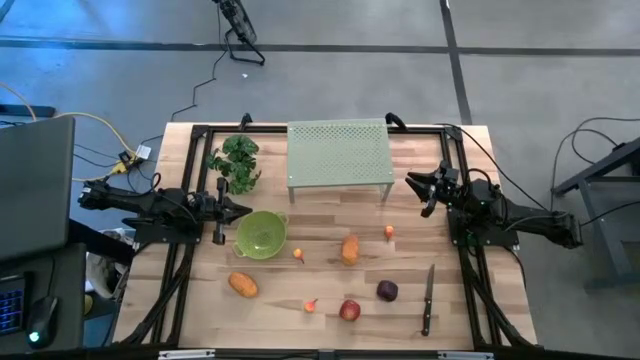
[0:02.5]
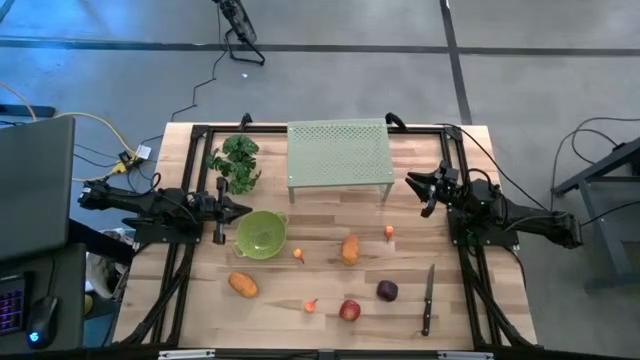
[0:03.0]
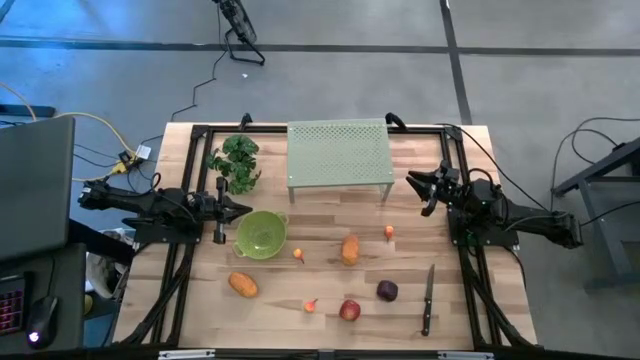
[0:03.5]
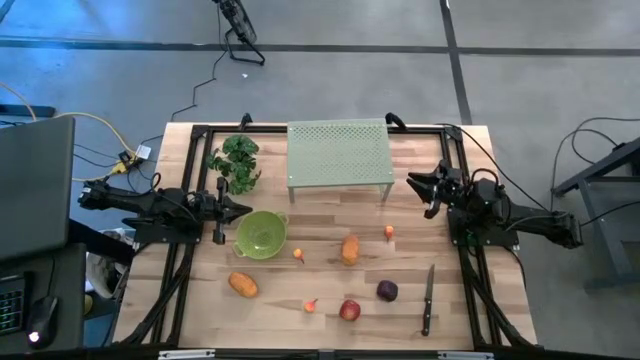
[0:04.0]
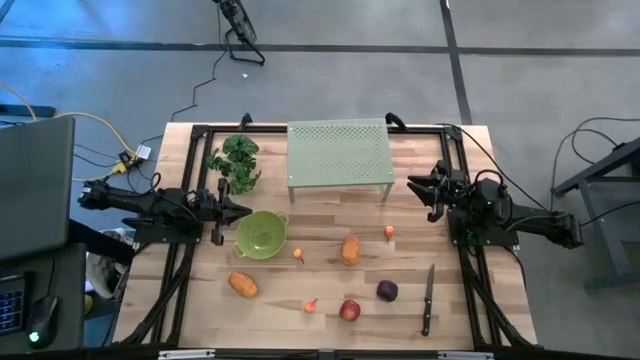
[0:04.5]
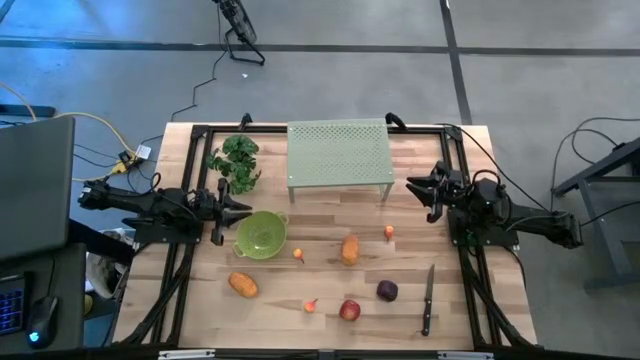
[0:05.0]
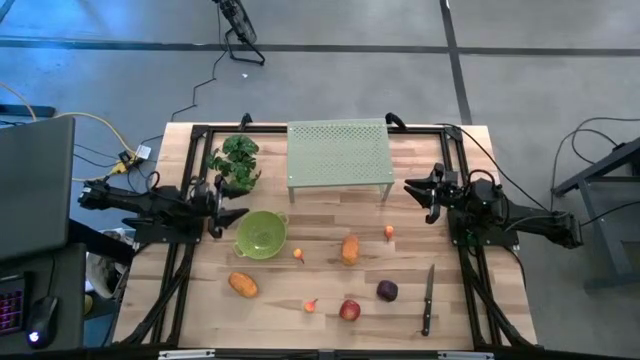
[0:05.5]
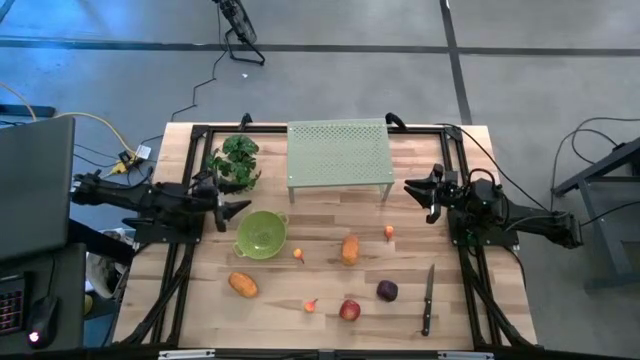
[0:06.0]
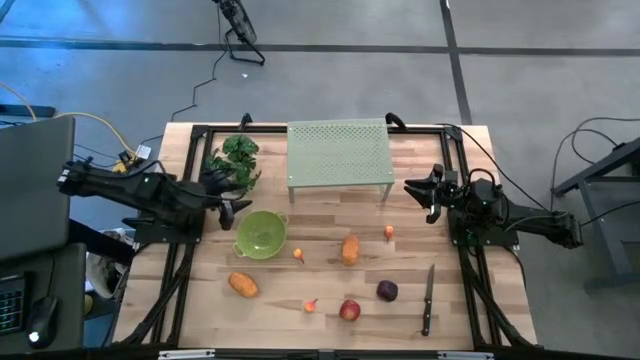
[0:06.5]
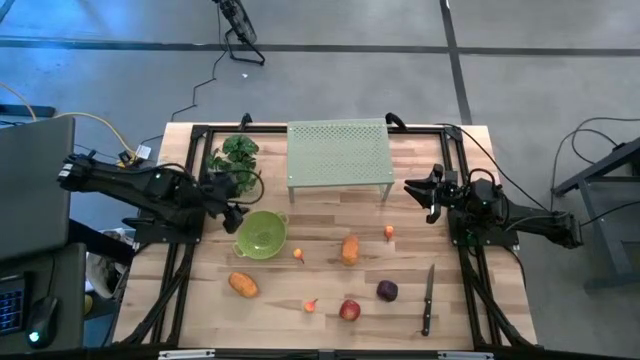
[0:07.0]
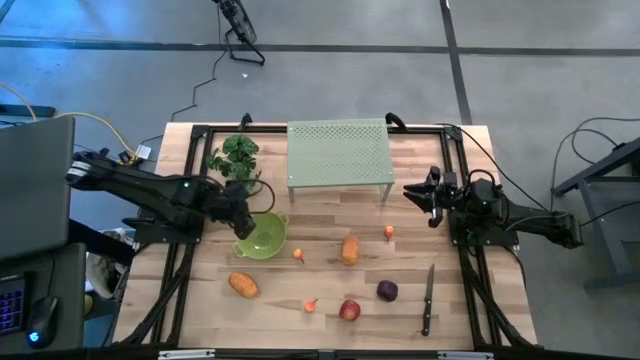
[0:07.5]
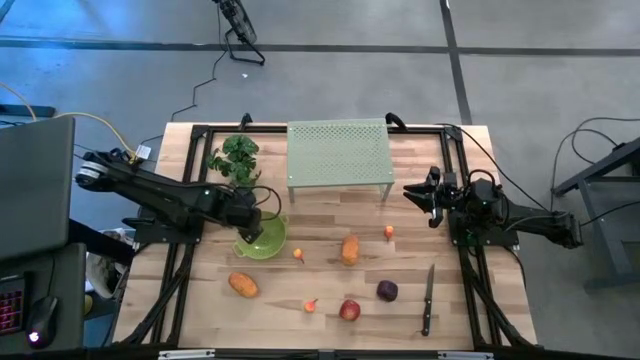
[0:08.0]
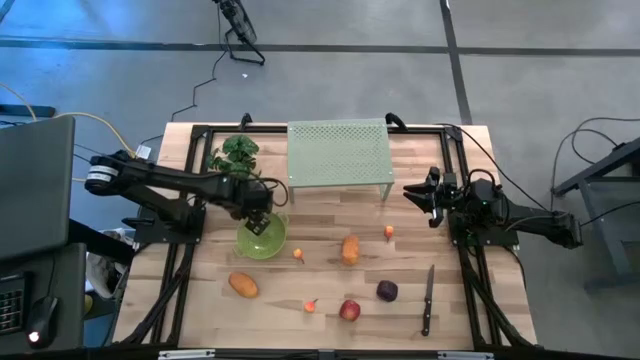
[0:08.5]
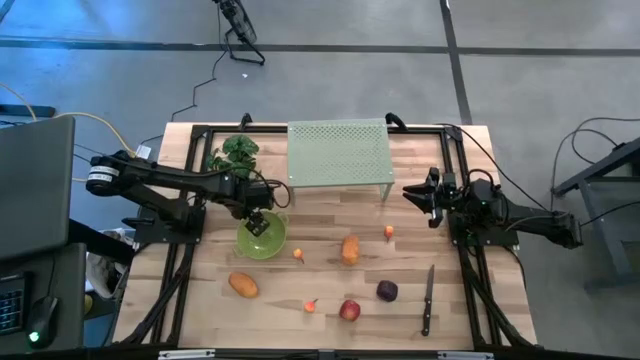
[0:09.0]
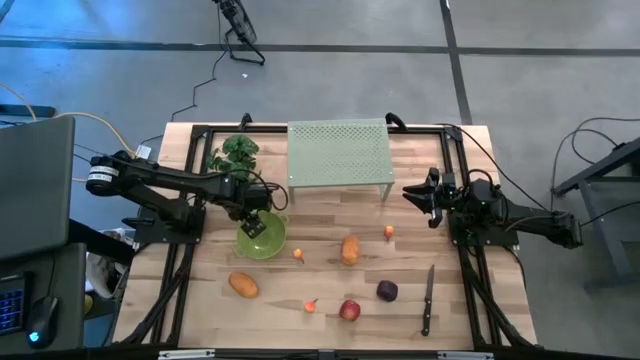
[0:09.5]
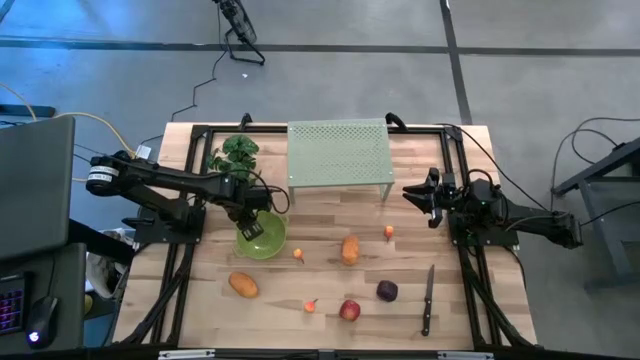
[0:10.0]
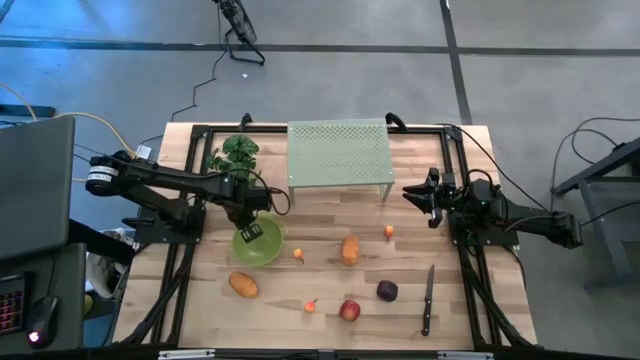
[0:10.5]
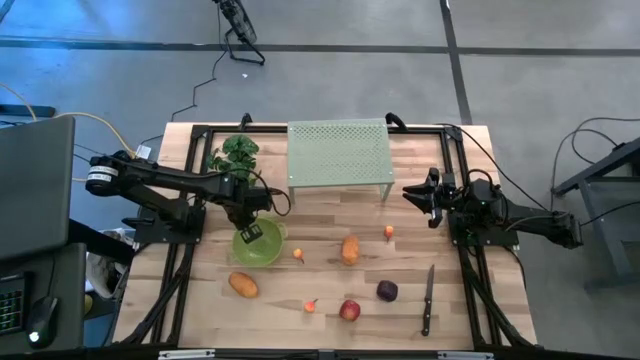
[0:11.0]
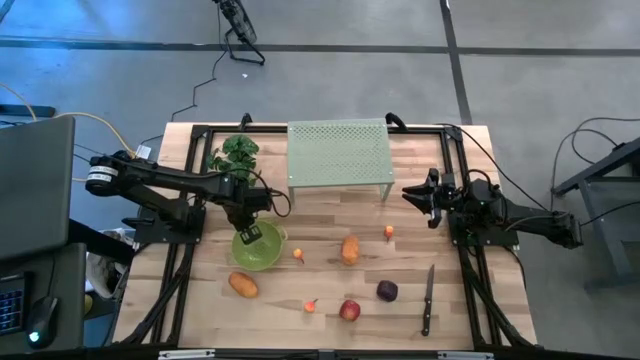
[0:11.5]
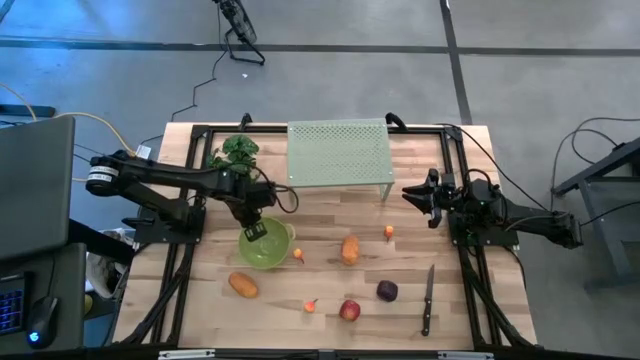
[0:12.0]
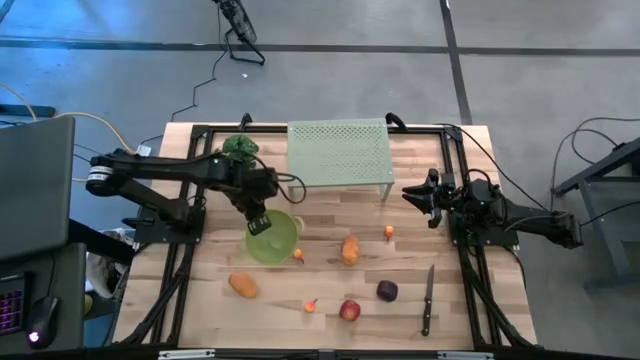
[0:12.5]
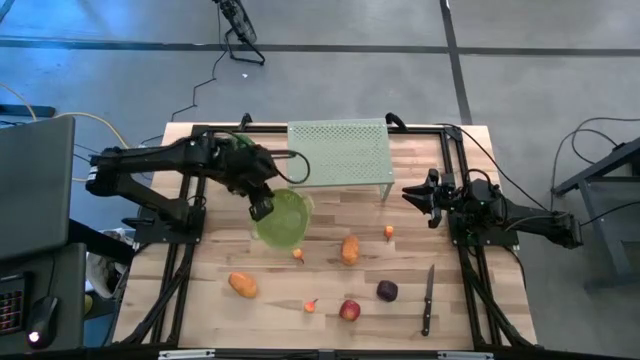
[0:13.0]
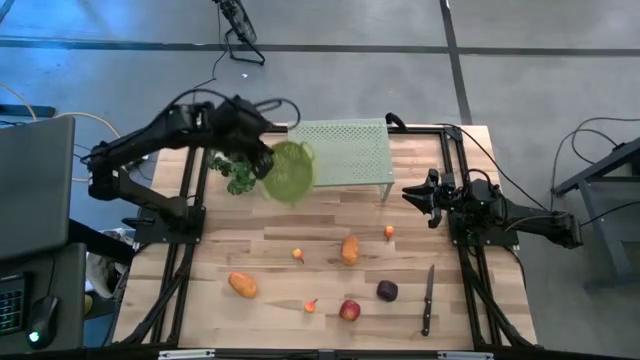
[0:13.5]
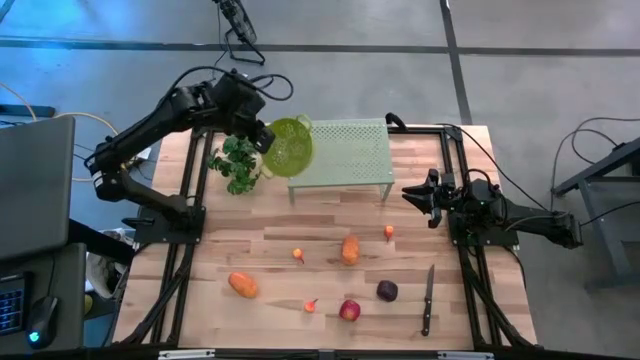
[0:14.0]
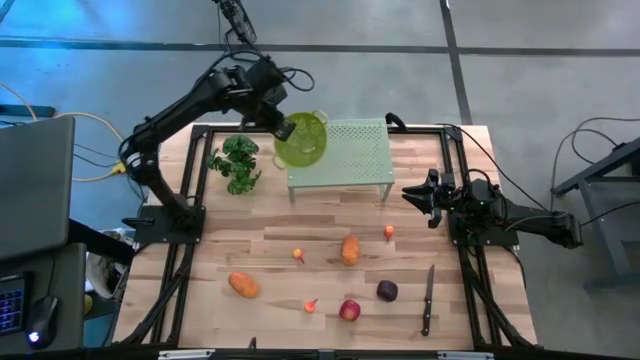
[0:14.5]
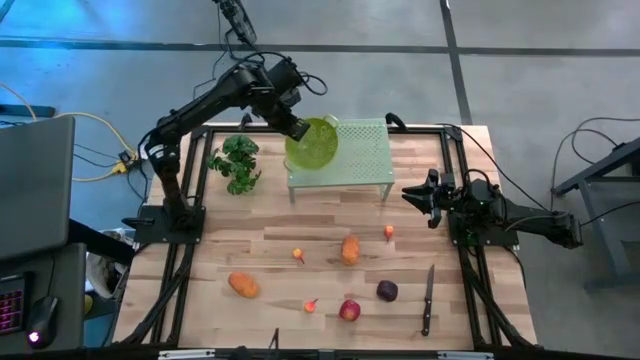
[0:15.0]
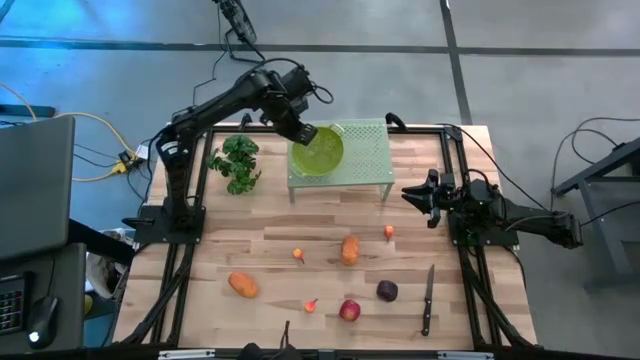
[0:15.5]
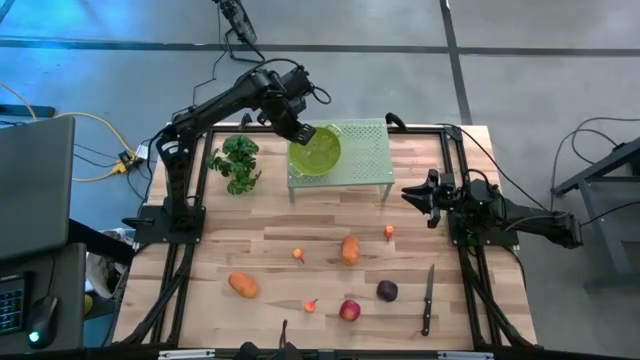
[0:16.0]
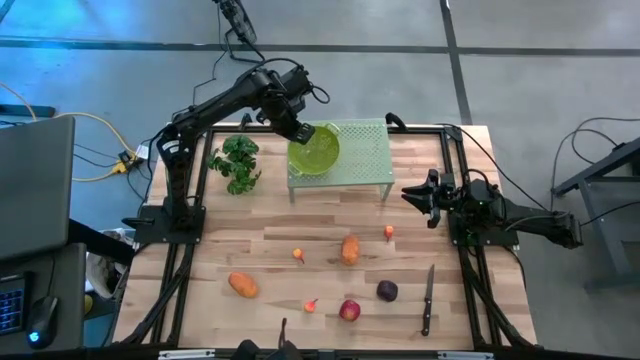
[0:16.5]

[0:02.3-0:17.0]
Task: Pick & Place Fruit
Put the green strainer bowl on the shelf

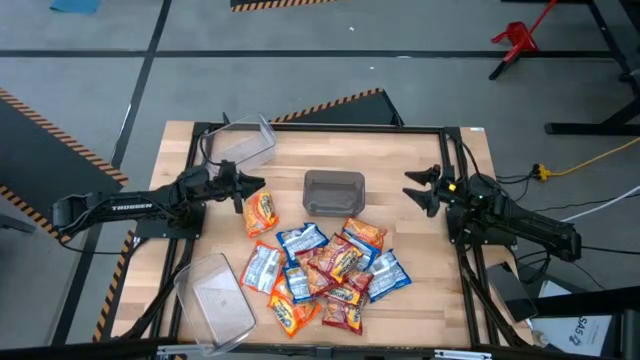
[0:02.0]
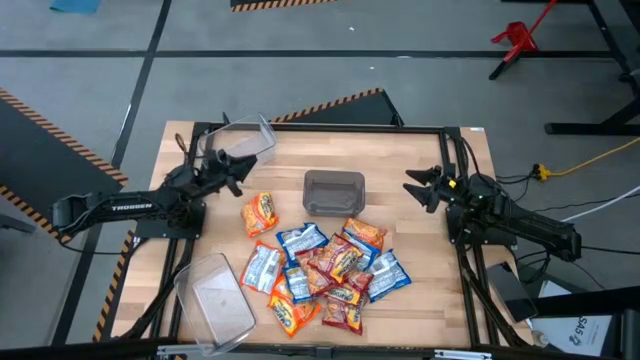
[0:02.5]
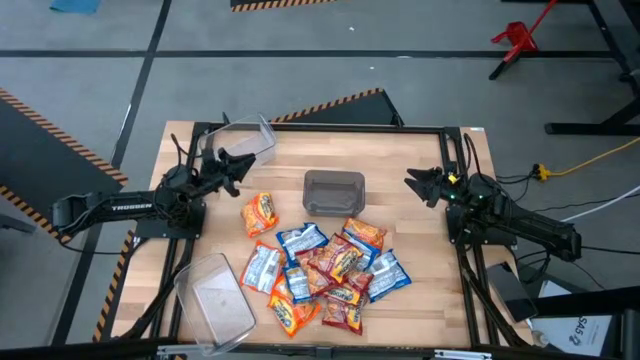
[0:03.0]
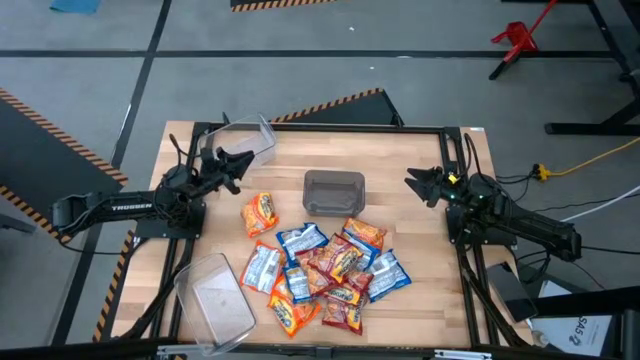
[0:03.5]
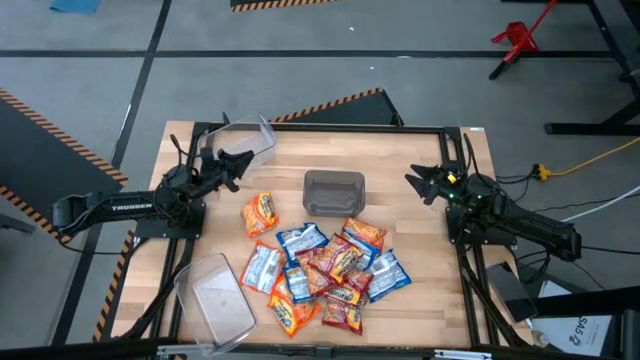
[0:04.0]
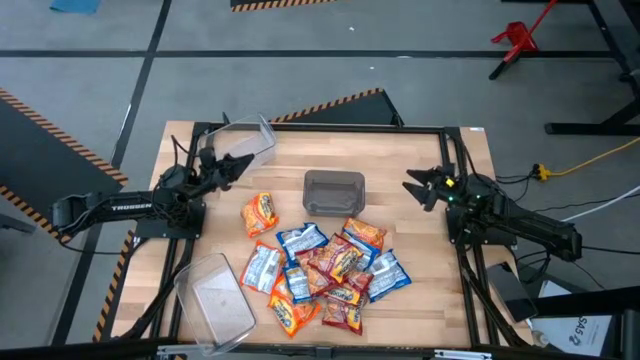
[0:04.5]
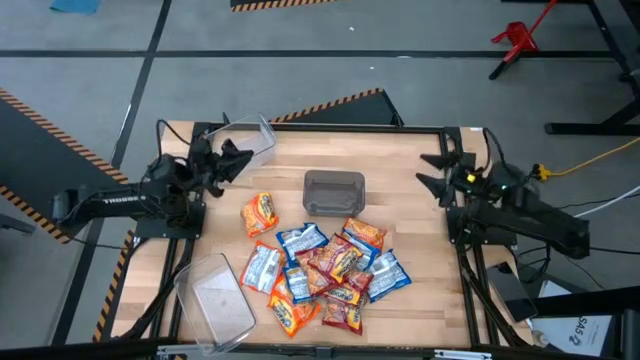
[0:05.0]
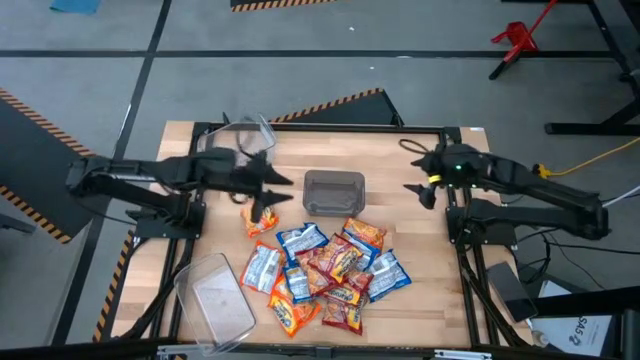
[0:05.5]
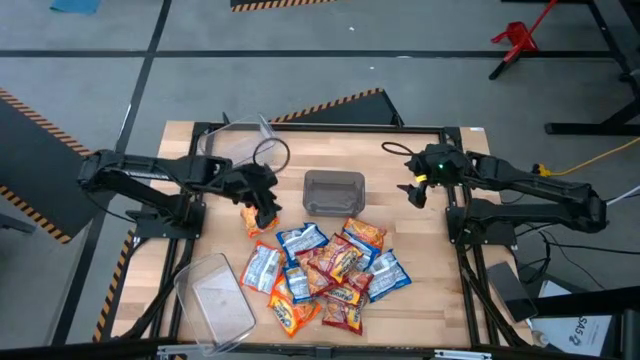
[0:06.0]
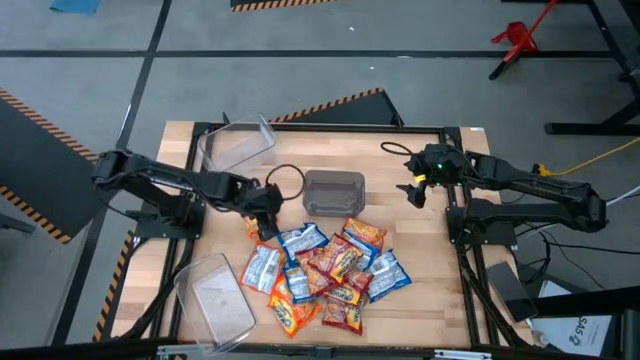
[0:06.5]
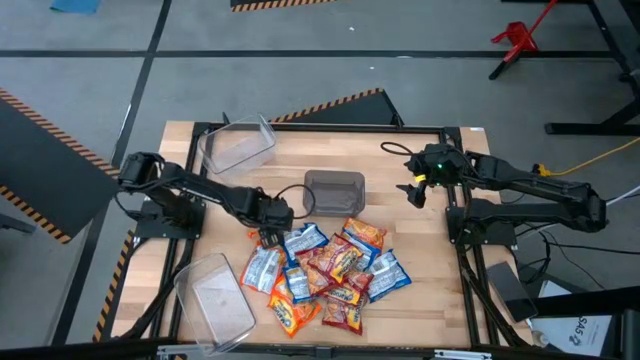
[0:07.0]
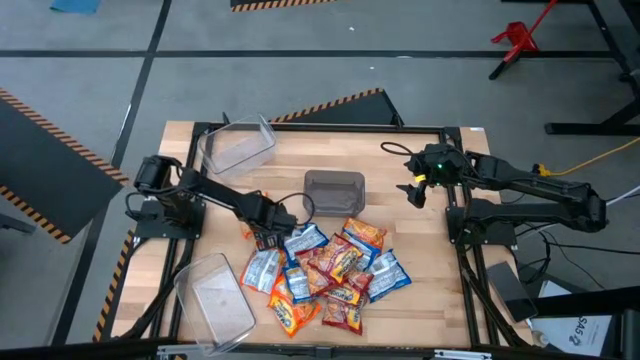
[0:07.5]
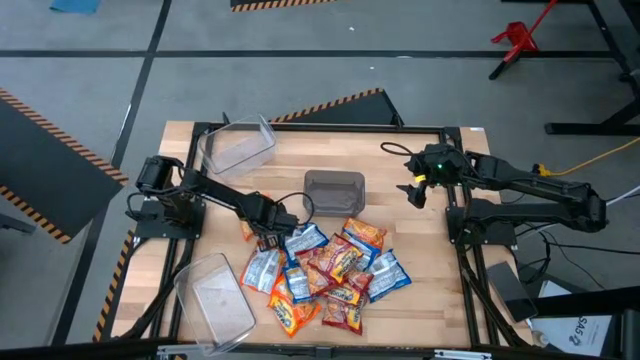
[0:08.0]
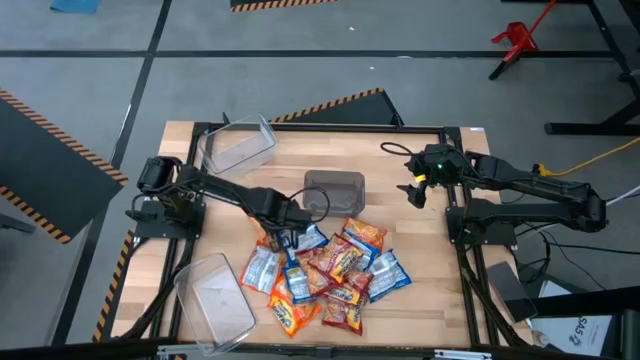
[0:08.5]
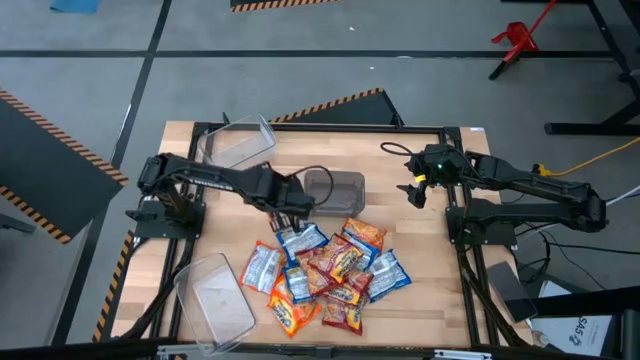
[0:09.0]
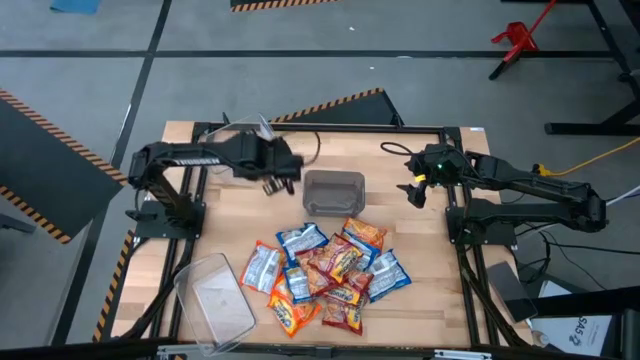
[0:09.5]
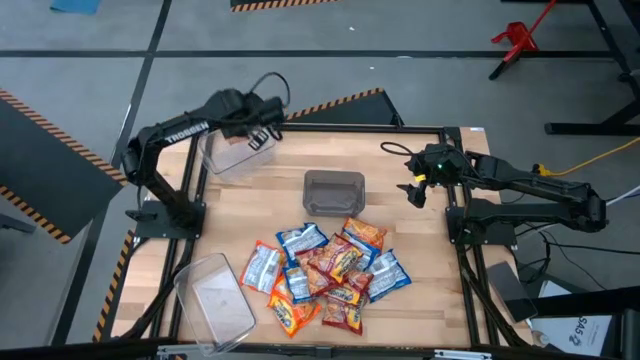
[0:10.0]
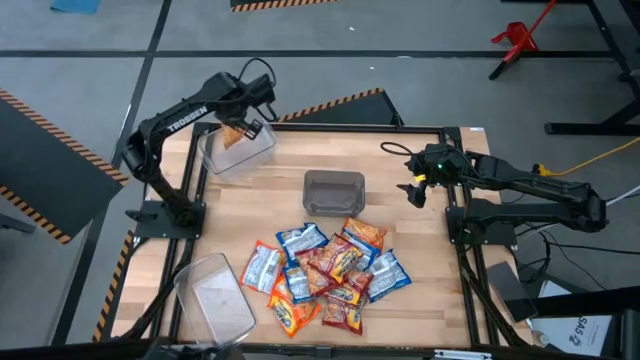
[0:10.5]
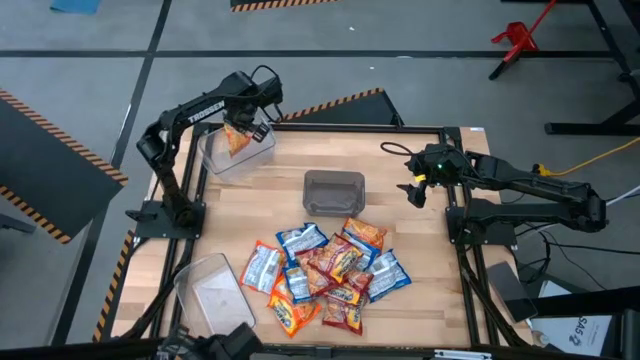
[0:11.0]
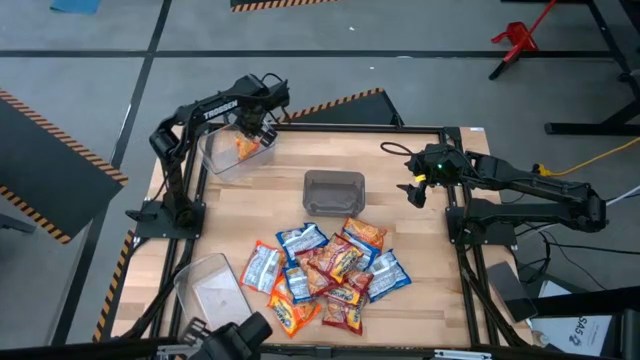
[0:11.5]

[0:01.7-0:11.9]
Task: Sort Maruchan noodles
Put the orange noodle pack into the top transparent bin
